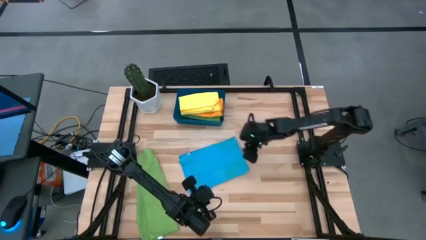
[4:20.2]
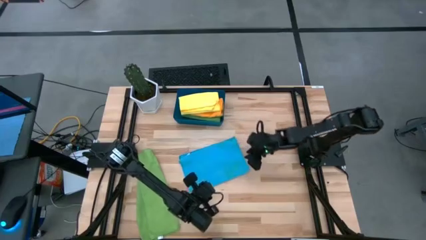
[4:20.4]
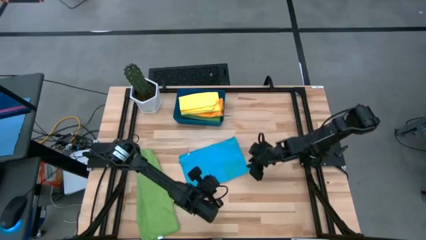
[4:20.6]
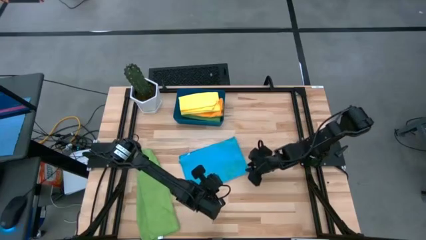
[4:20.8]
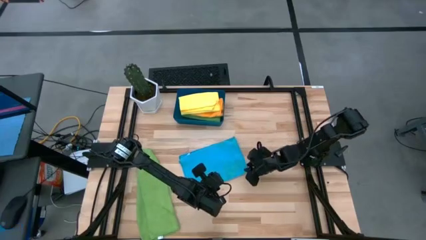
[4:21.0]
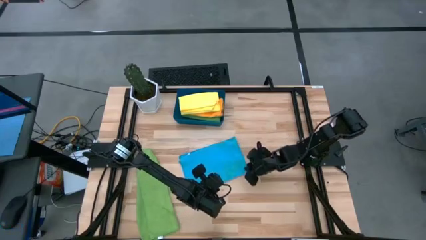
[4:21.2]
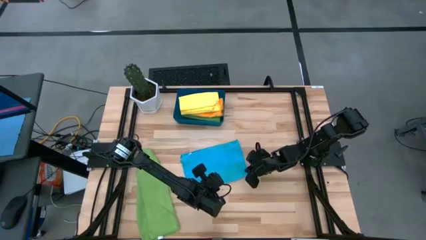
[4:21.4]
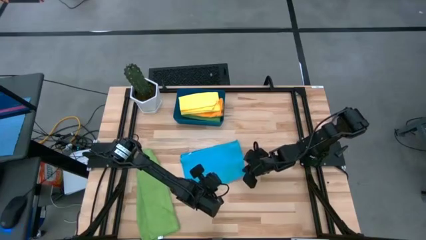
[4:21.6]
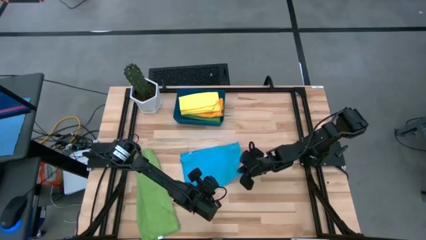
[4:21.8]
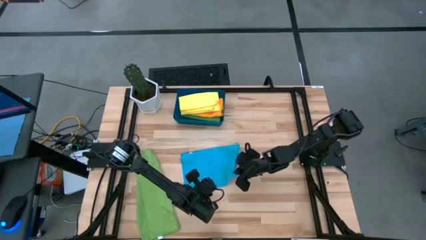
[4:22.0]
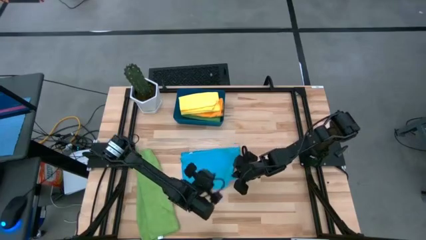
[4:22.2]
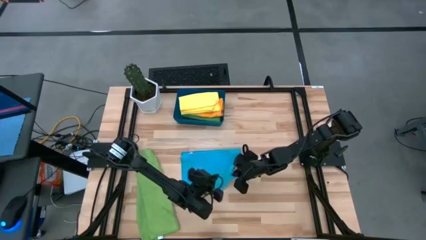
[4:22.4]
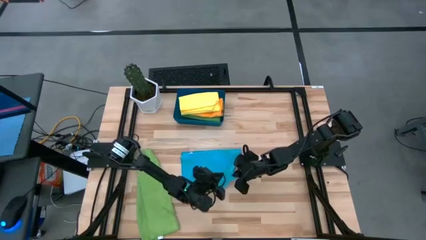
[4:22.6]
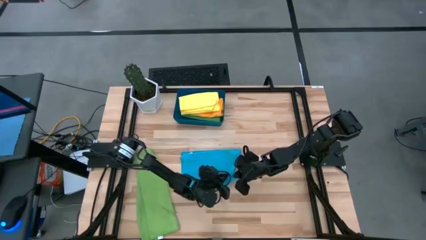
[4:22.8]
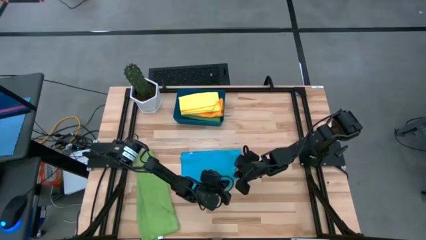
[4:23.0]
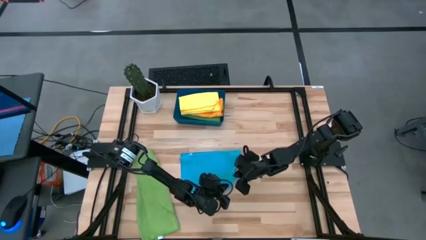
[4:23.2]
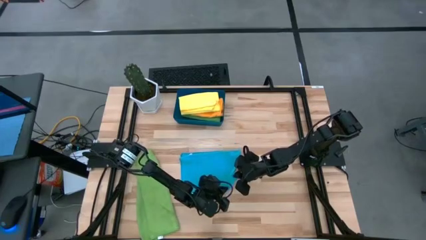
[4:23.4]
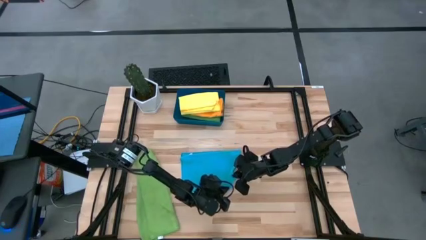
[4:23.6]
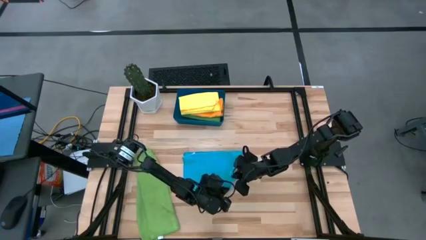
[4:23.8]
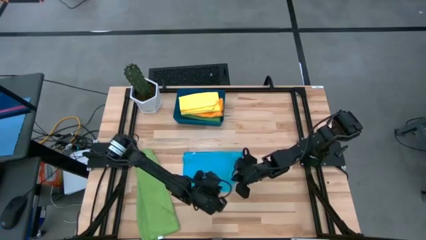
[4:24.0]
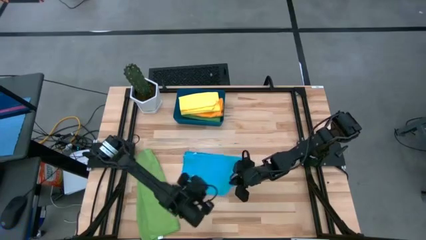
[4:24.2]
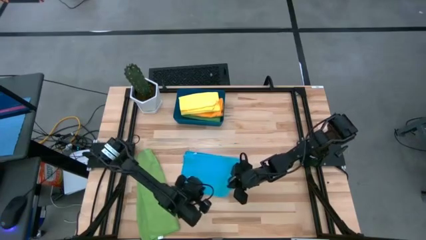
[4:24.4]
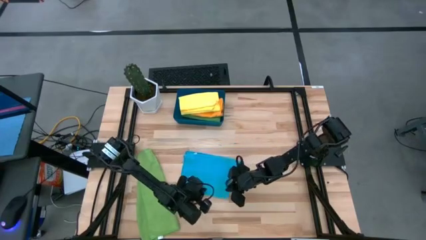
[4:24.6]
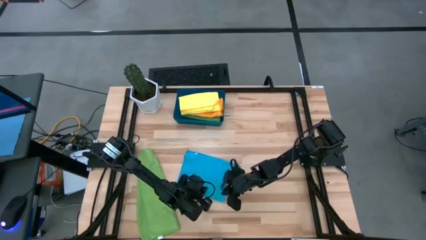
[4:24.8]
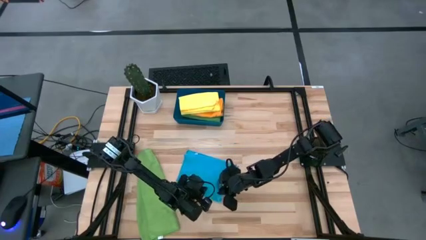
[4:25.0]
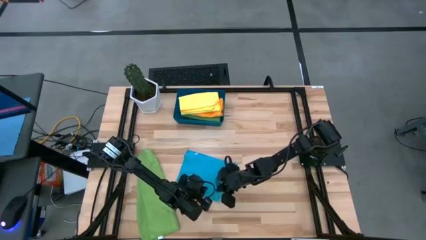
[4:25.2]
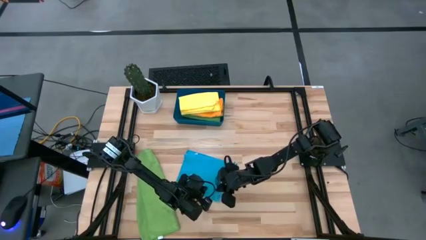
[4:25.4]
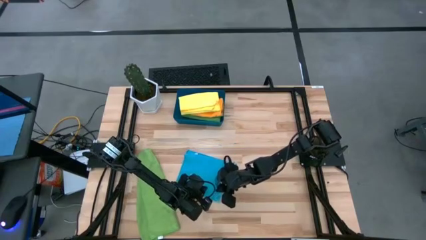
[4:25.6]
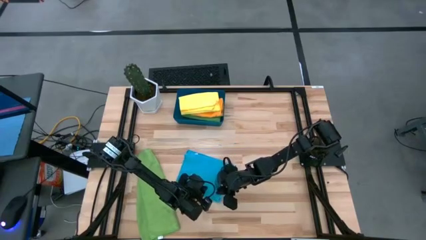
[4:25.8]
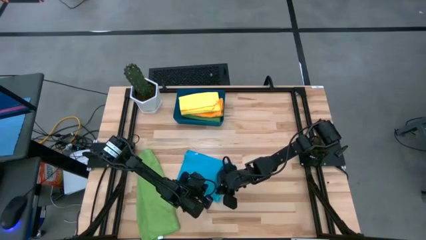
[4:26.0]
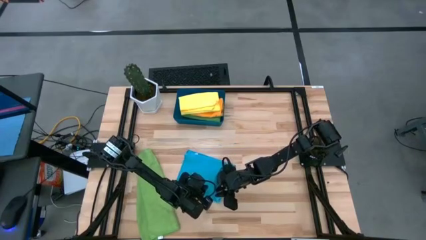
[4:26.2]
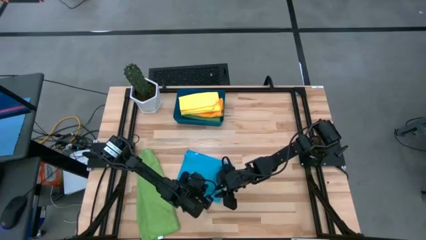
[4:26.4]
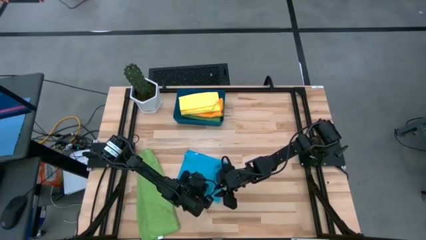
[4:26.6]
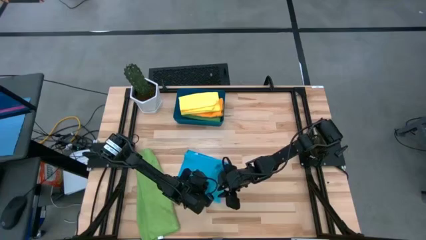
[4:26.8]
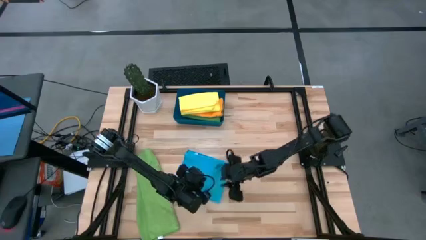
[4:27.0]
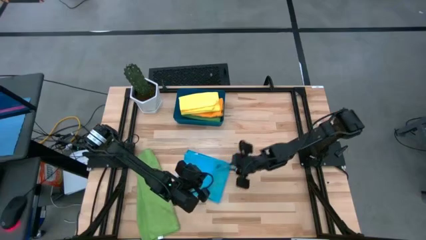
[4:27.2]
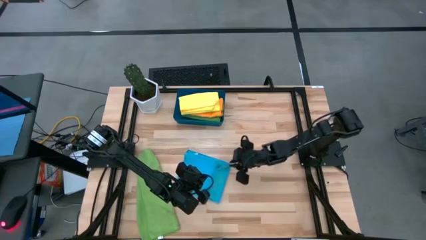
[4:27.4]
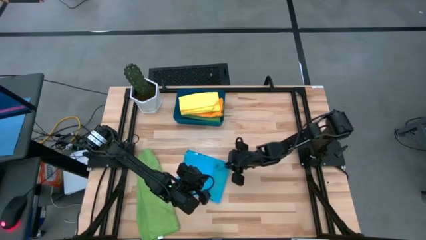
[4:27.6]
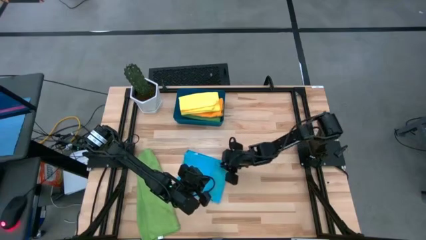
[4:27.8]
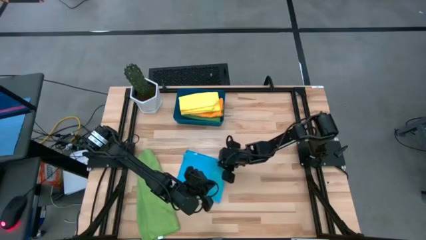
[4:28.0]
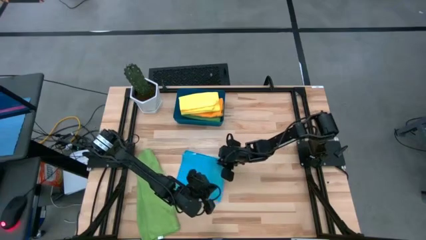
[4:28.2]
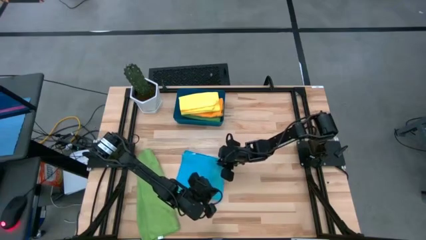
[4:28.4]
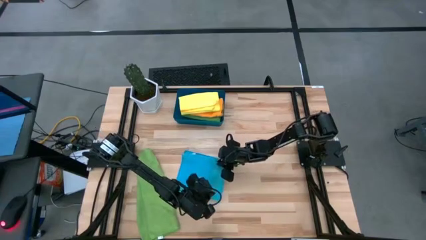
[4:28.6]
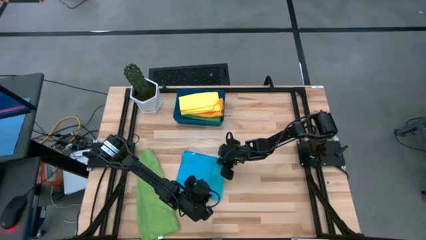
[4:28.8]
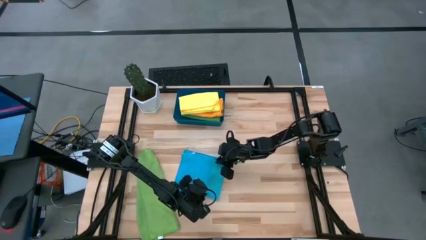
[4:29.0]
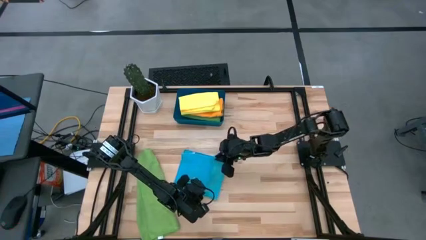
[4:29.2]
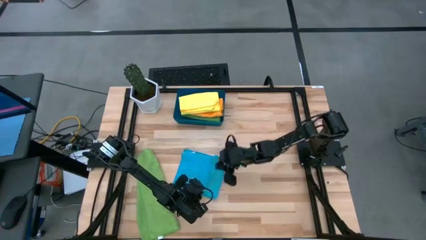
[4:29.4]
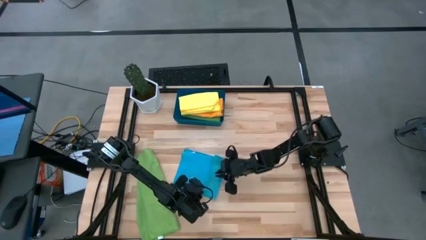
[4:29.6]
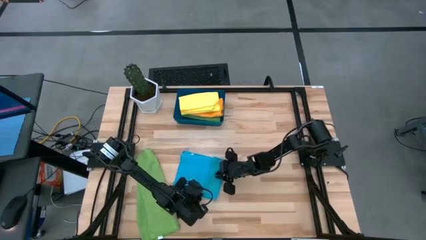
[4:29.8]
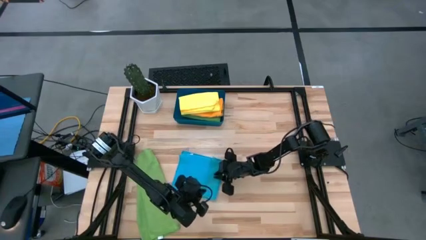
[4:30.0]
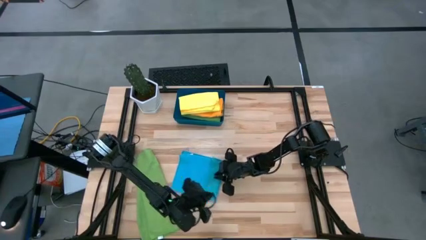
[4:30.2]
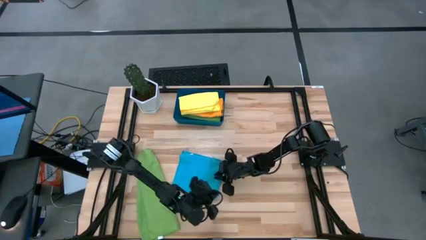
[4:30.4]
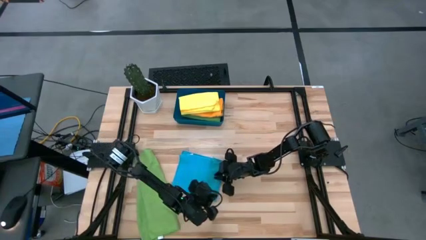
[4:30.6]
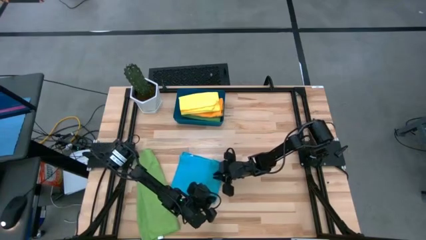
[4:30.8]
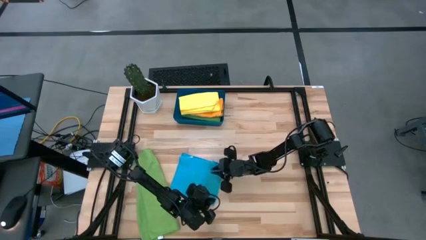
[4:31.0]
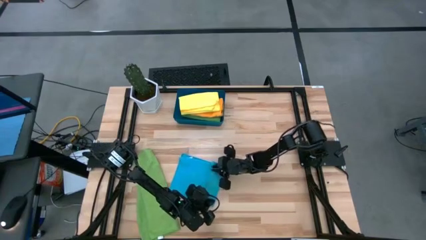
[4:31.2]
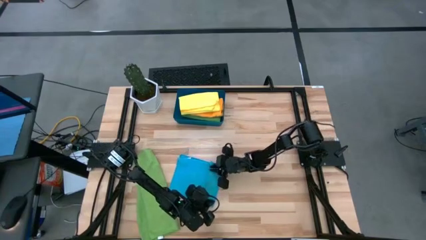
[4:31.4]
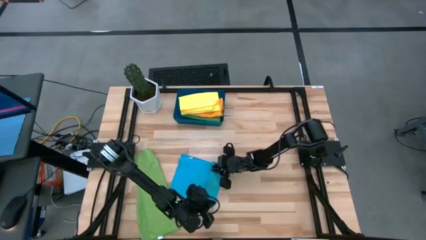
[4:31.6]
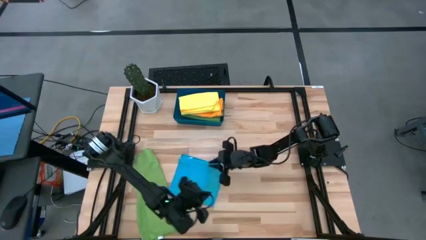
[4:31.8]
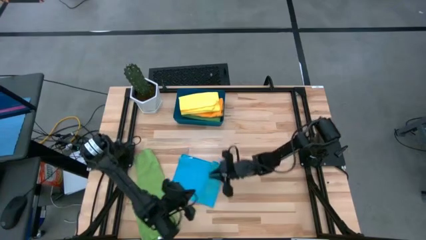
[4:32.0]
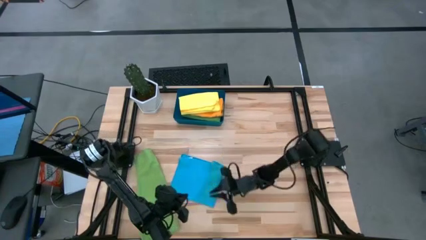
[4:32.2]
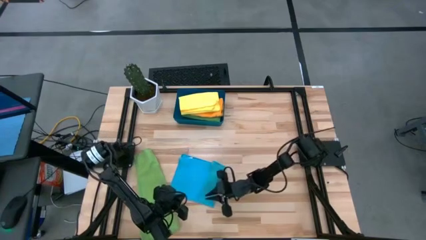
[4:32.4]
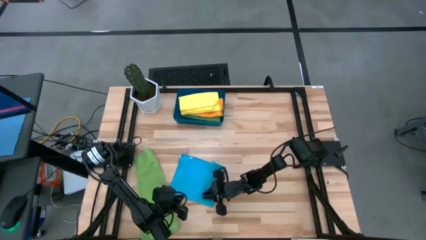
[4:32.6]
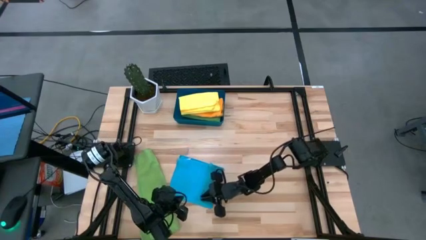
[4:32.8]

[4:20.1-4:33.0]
Task: Fold microfiber towels
Fold the blue towel
